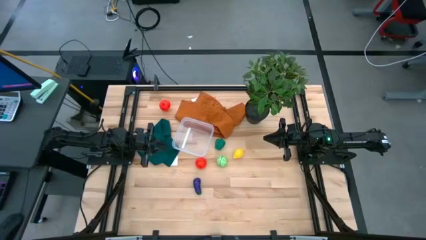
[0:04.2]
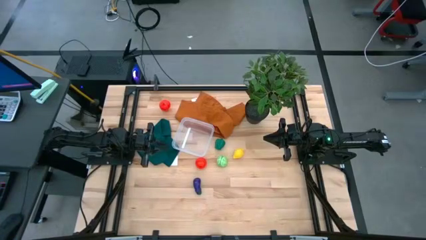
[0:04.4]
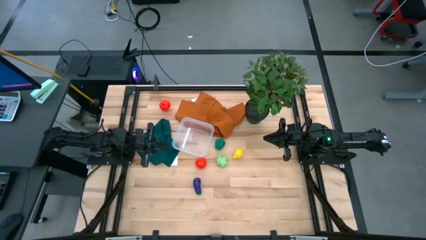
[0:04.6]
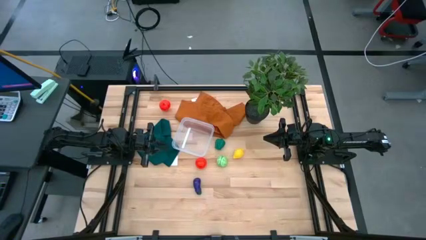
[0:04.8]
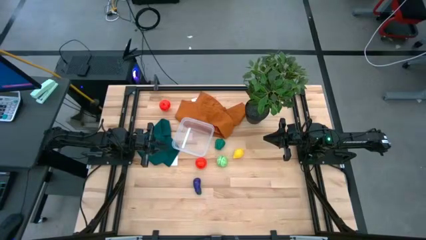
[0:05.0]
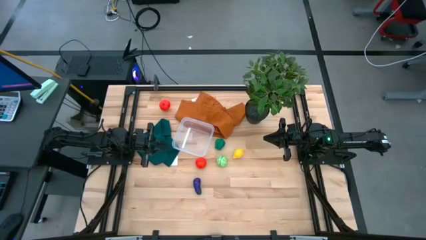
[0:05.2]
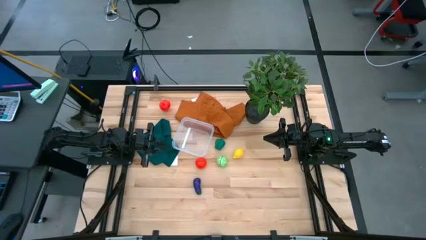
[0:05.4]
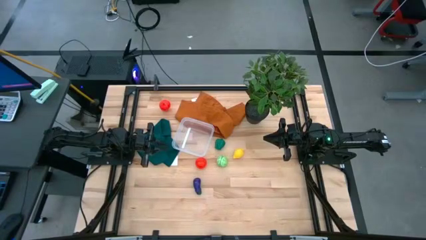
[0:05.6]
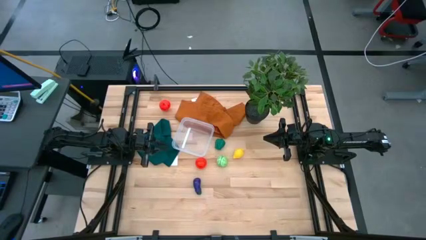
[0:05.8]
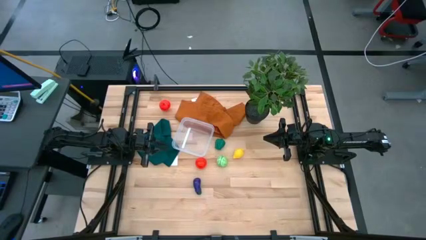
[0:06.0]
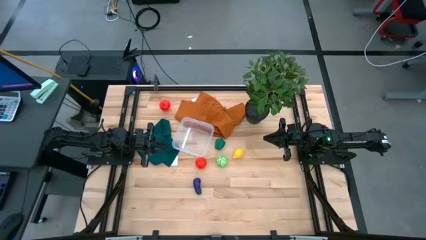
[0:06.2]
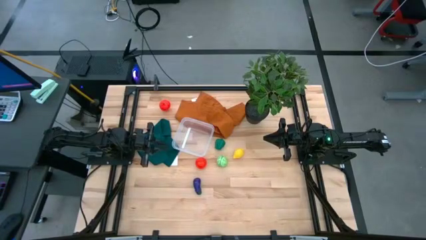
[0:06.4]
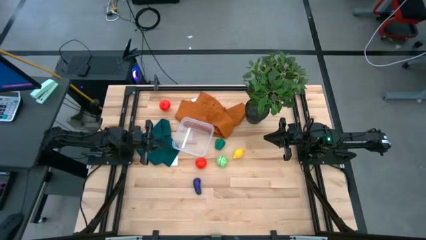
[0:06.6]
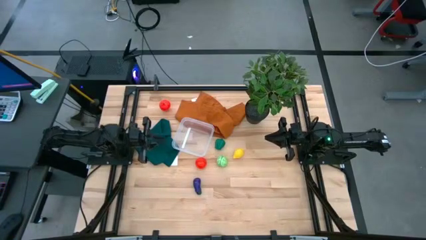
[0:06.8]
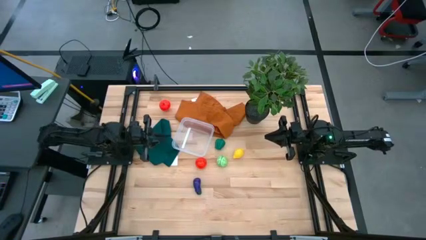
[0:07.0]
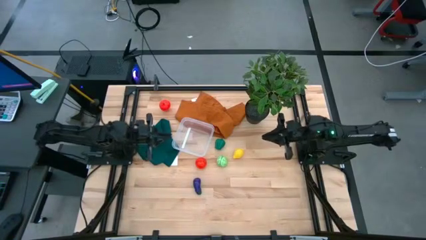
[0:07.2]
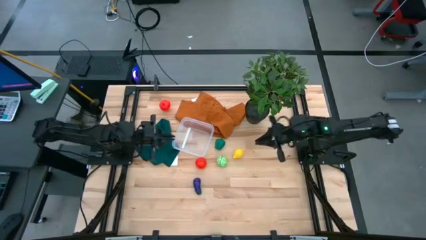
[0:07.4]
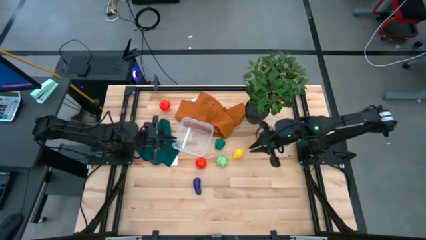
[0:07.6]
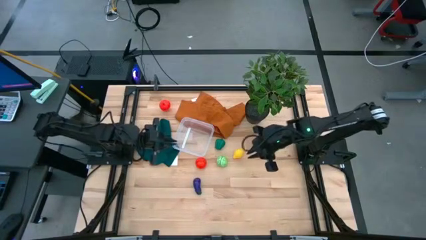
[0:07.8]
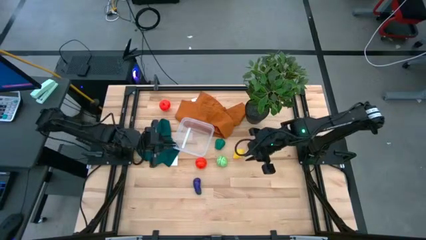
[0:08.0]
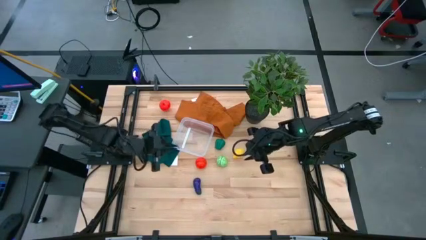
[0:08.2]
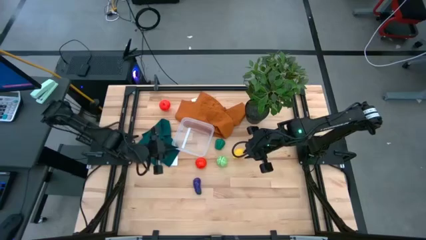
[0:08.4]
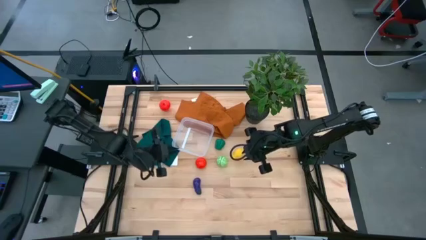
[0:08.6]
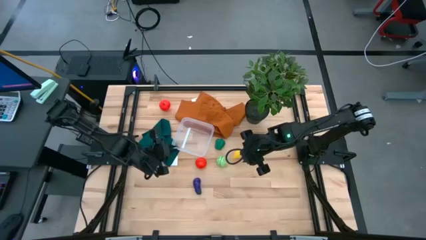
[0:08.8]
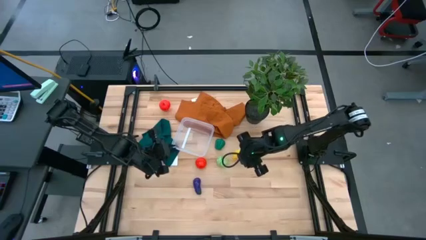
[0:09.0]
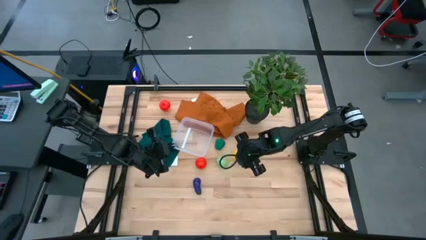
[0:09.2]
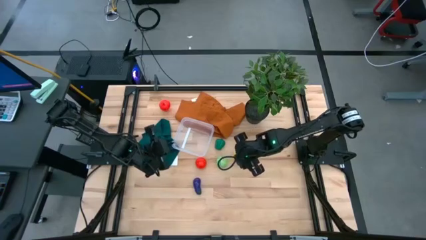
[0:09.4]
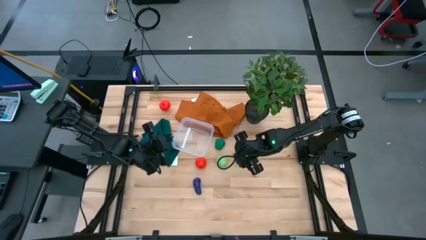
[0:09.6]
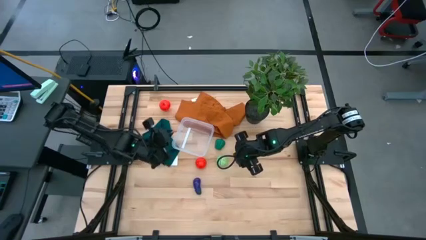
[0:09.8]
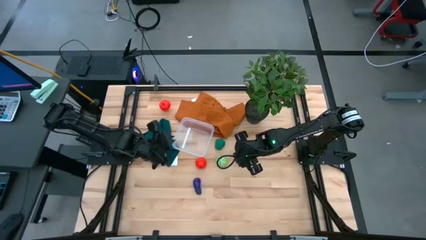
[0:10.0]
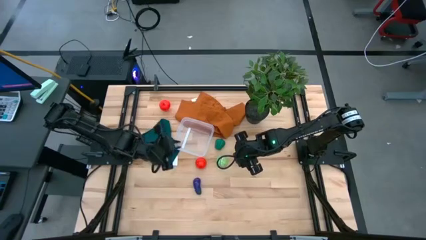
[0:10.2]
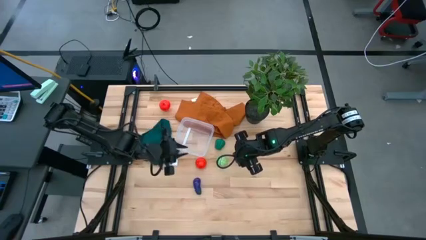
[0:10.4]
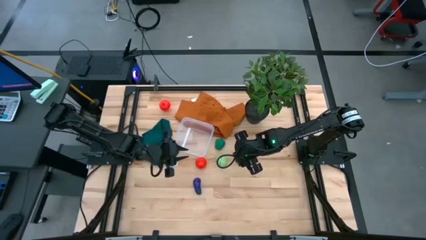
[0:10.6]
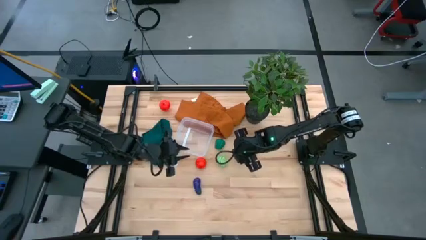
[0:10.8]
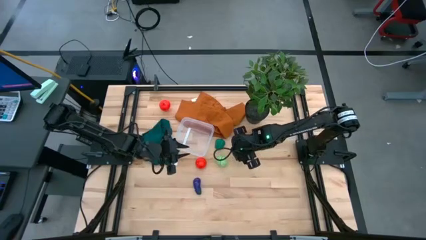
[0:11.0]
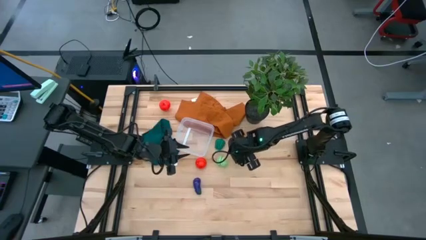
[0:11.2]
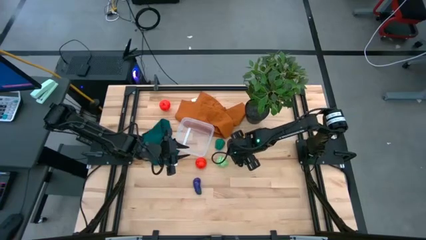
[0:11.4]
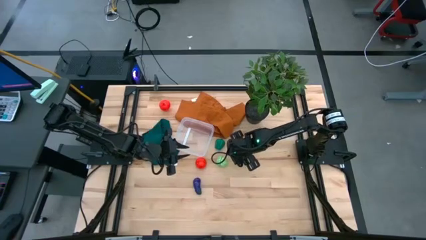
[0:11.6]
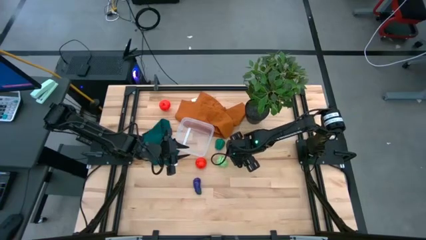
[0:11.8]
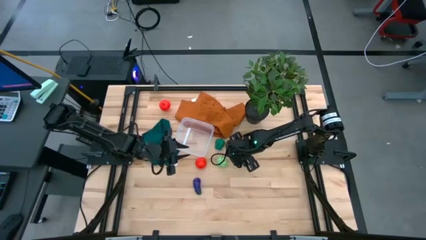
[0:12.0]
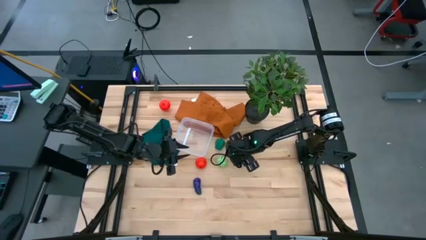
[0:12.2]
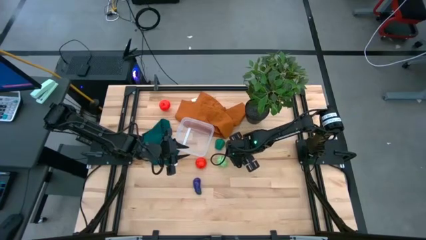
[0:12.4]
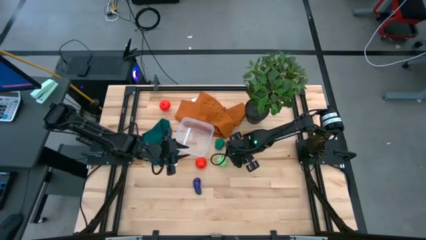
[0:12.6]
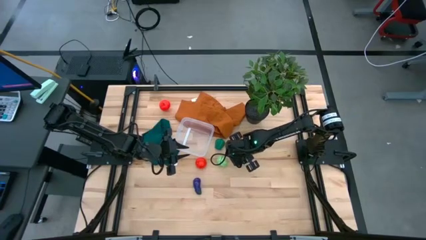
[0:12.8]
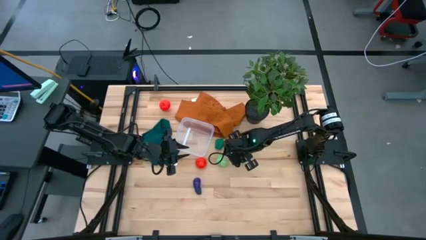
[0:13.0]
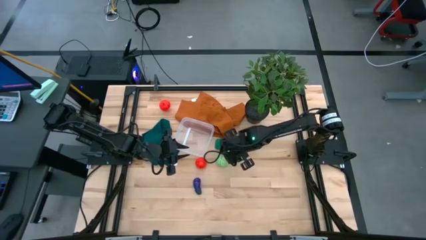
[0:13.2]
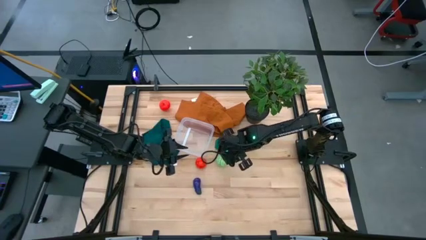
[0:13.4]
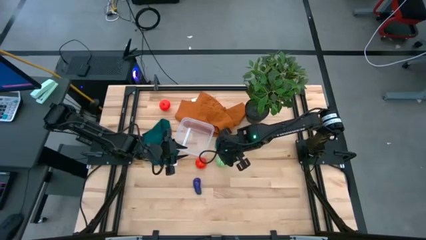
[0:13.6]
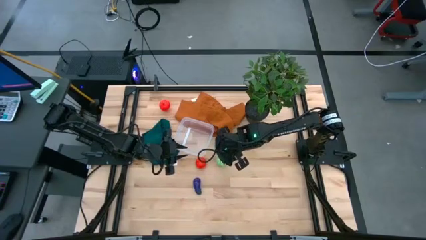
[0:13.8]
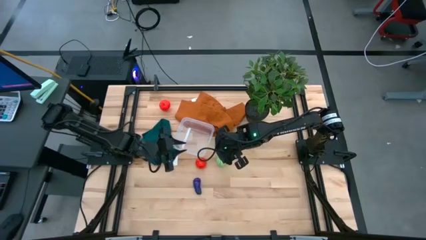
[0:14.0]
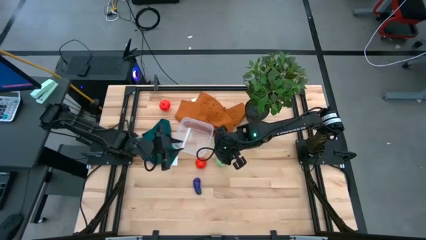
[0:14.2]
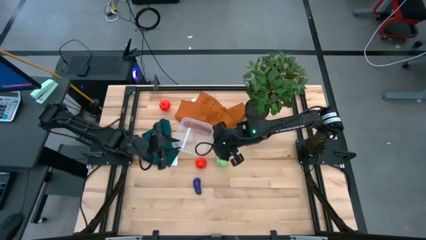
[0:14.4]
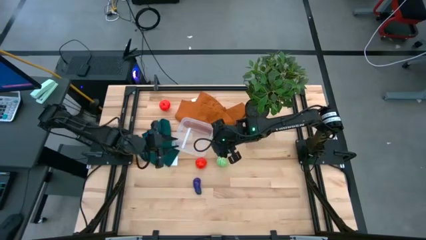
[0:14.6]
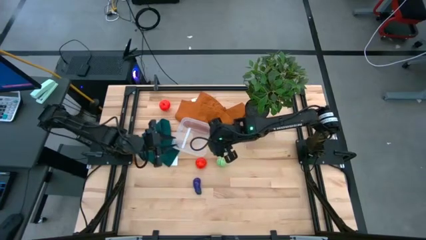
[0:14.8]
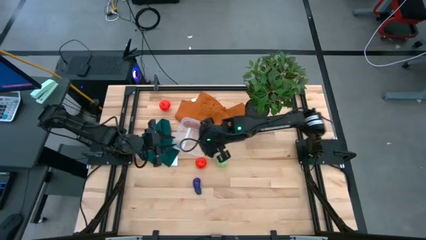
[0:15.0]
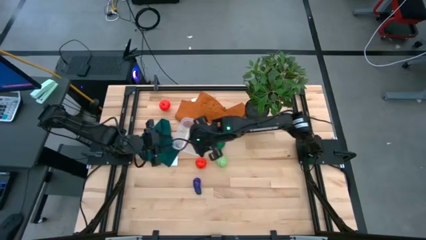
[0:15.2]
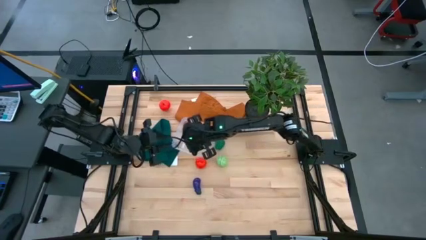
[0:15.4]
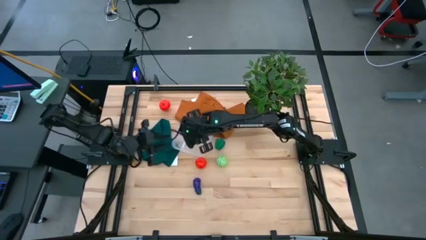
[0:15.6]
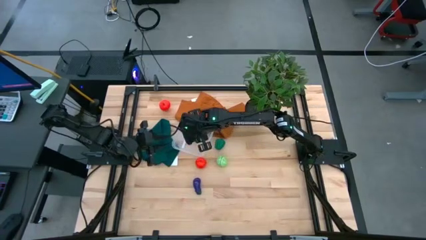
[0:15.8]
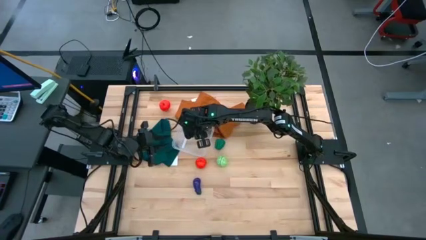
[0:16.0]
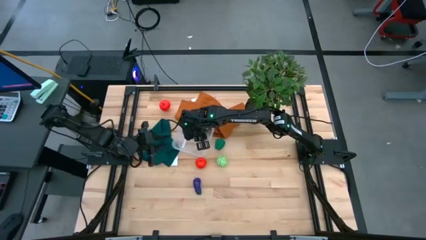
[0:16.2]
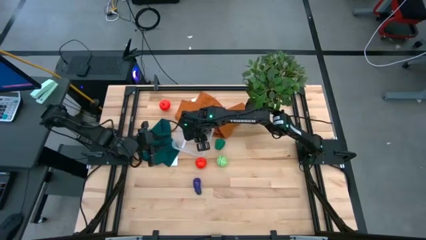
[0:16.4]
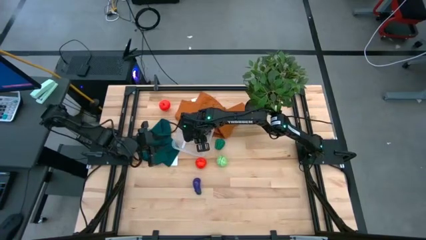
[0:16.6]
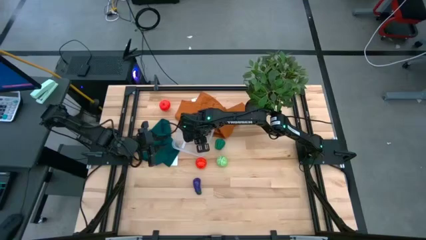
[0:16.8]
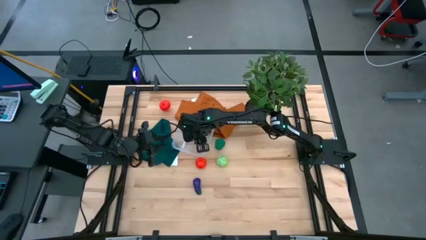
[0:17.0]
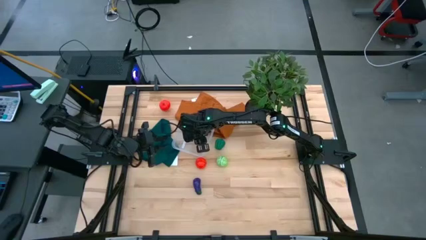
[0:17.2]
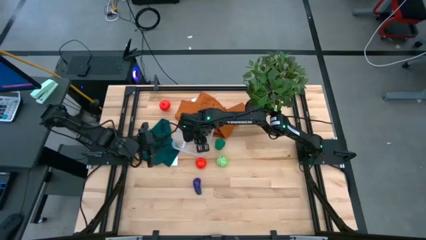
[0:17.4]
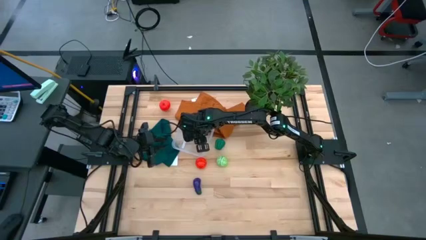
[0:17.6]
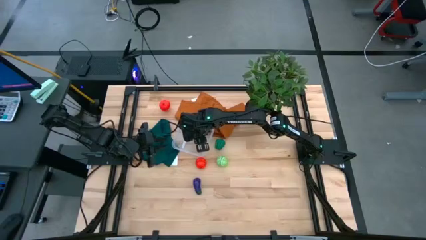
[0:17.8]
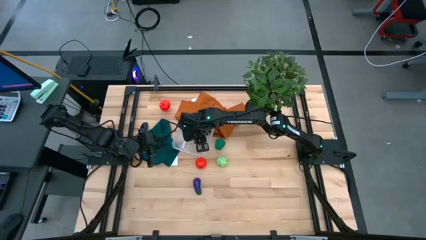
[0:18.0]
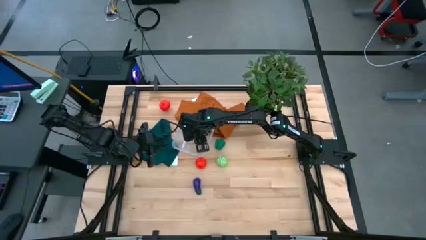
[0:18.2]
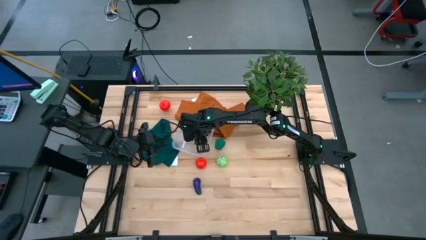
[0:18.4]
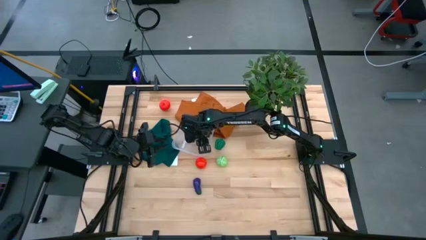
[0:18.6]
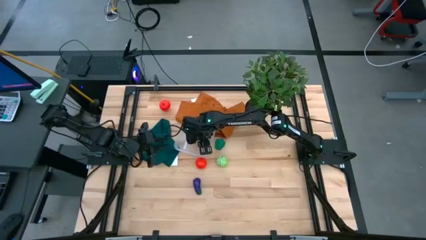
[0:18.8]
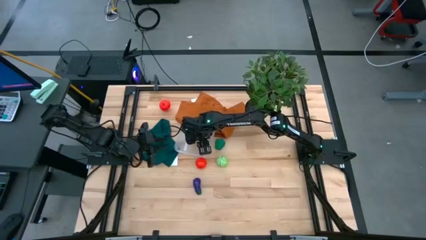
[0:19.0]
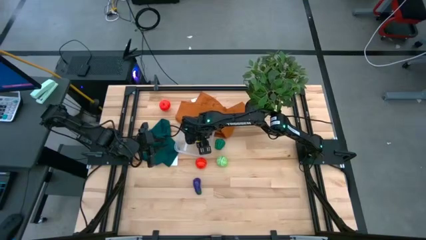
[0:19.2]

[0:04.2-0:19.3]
Task: Pick and placing Produce into tupperware
Put the yellow lemon into the transparent bin
